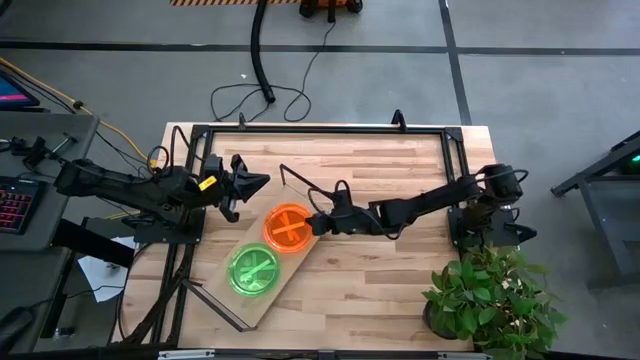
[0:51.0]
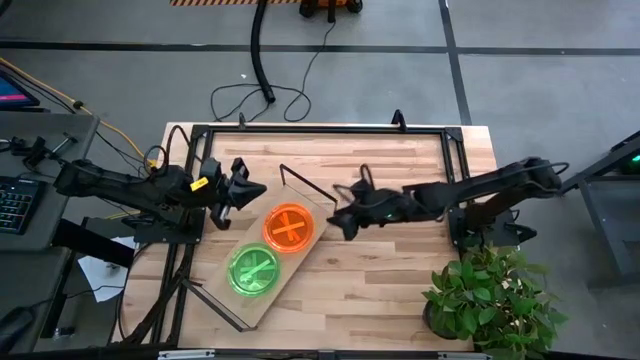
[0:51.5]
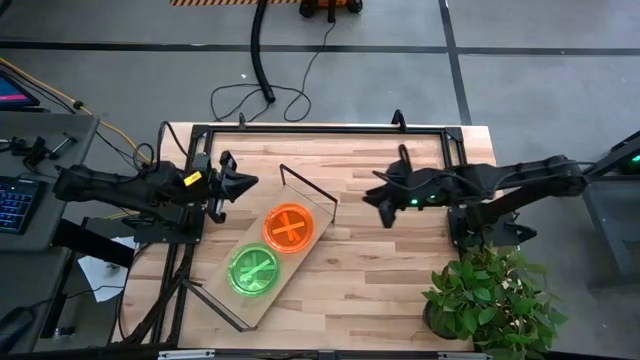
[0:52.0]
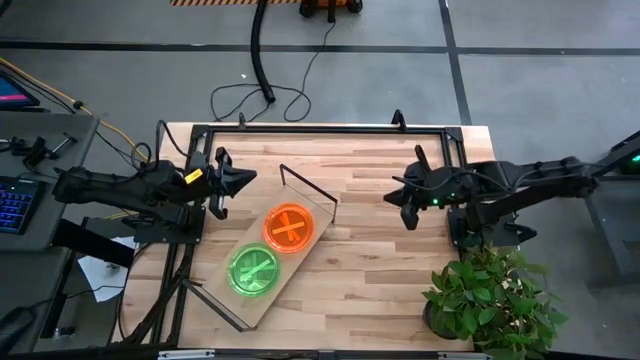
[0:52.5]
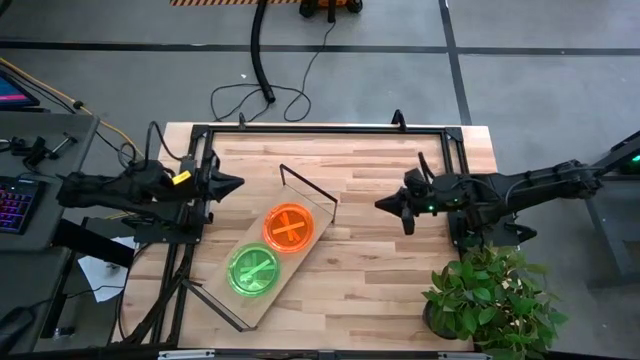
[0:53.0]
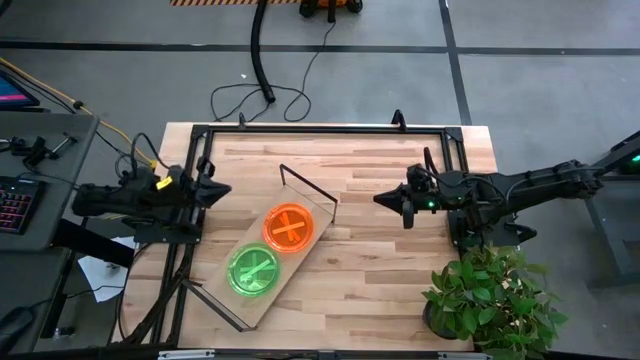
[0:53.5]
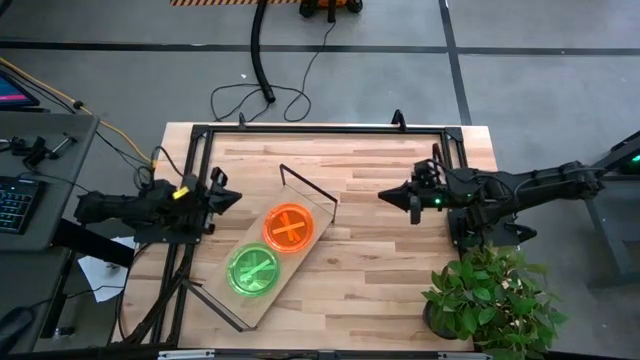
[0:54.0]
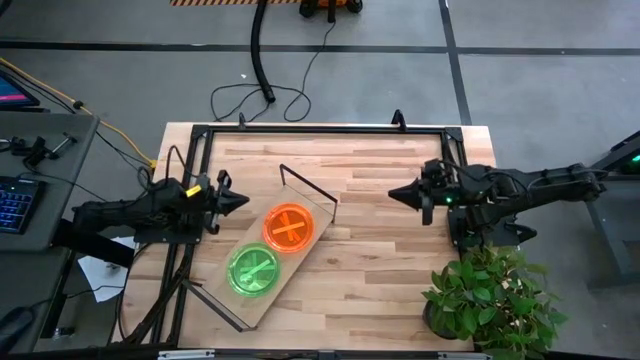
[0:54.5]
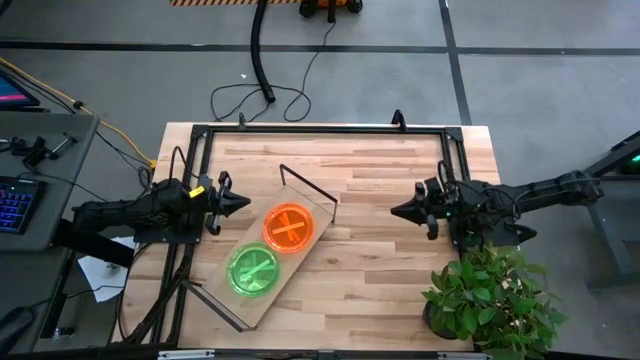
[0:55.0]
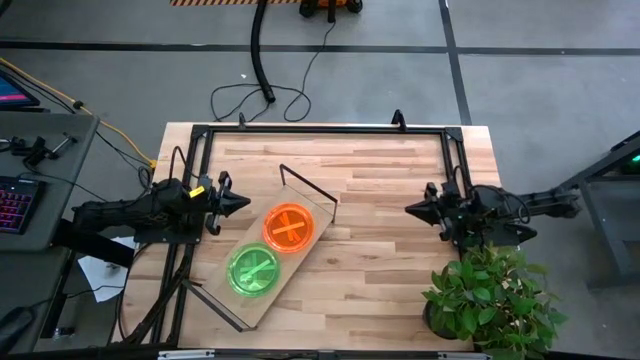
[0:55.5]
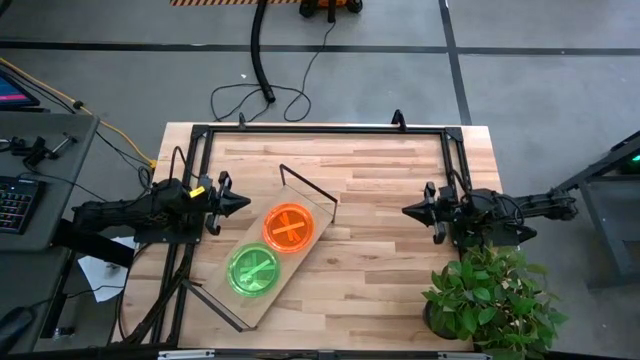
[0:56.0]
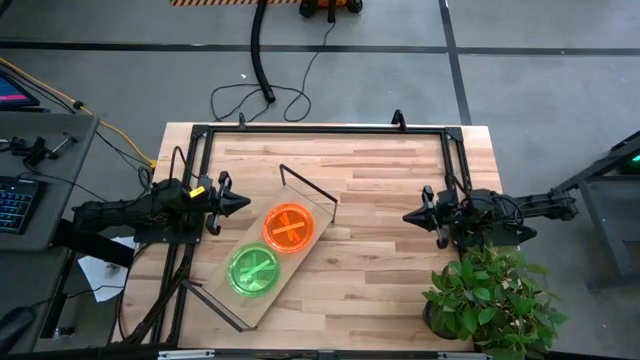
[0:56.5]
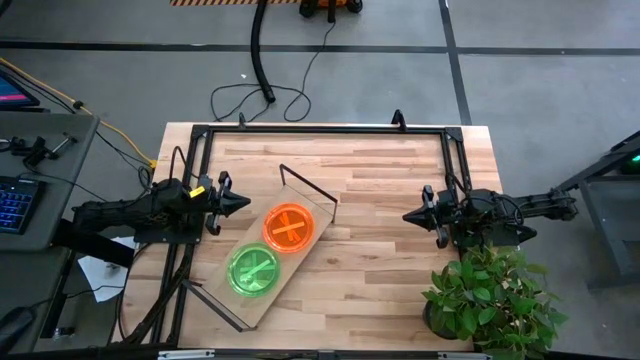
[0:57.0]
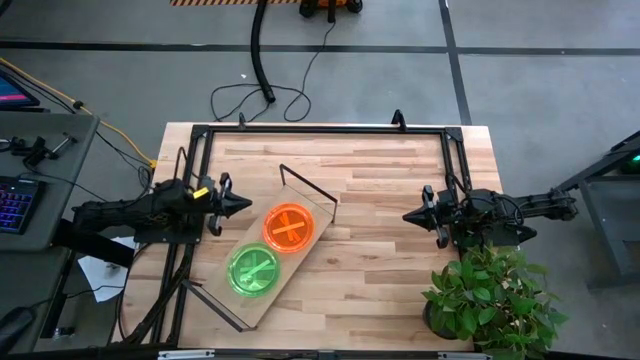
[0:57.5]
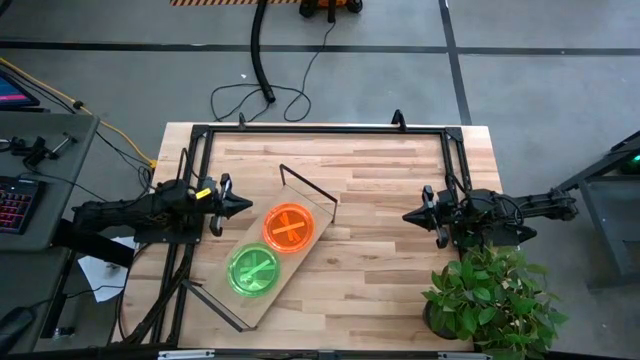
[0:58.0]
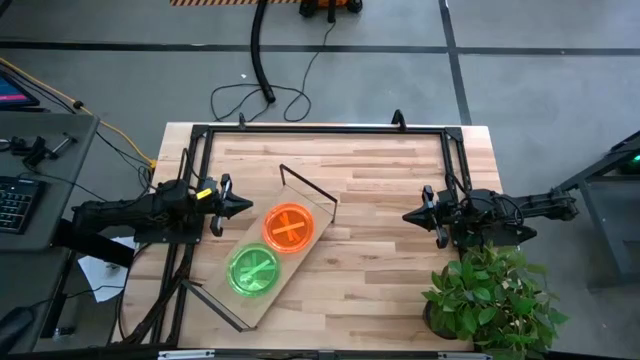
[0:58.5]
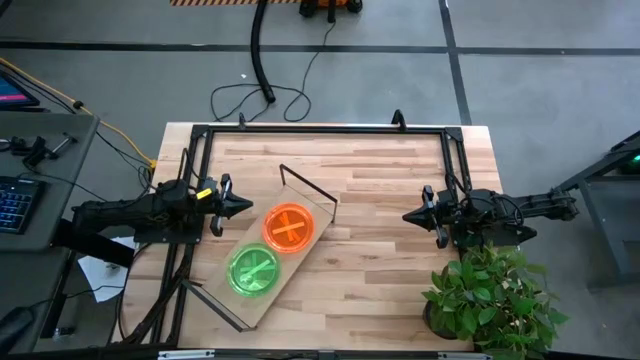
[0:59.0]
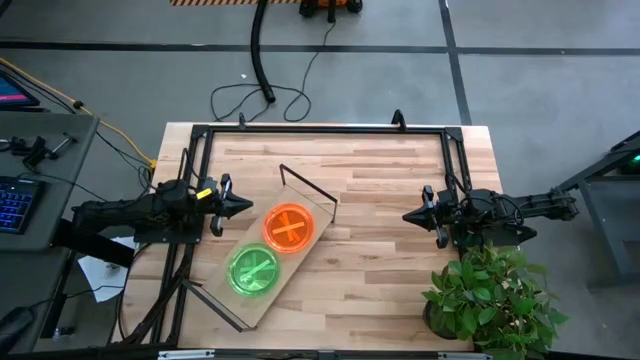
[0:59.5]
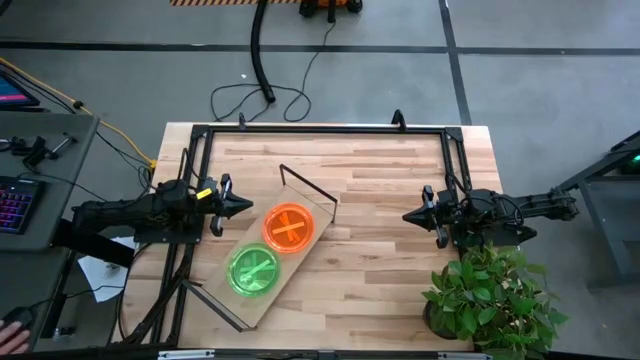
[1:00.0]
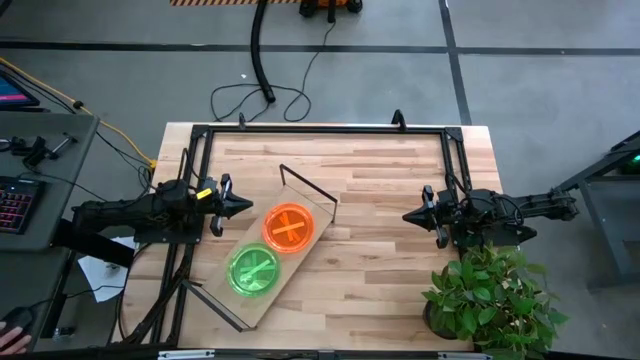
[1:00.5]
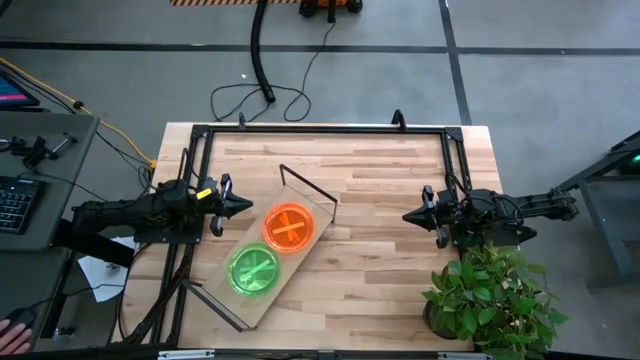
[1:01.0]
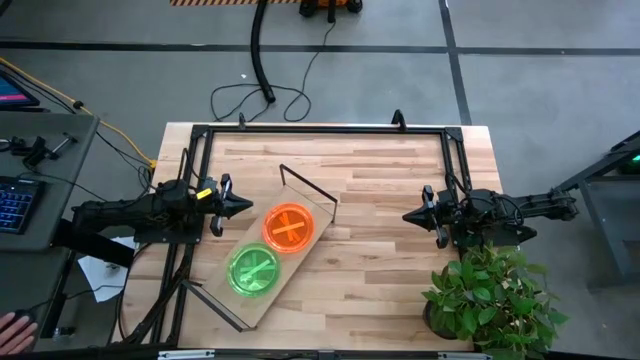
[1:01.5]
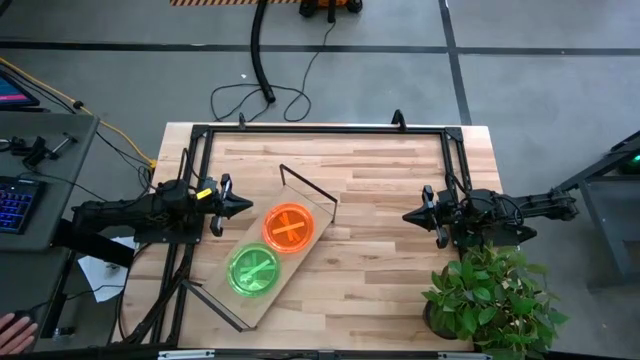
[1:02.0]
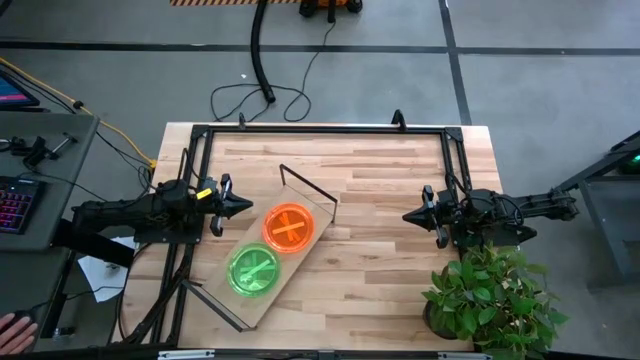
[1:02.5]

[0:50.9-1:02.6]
Task: Place and stack plates onto a shelf
Return to Home Position

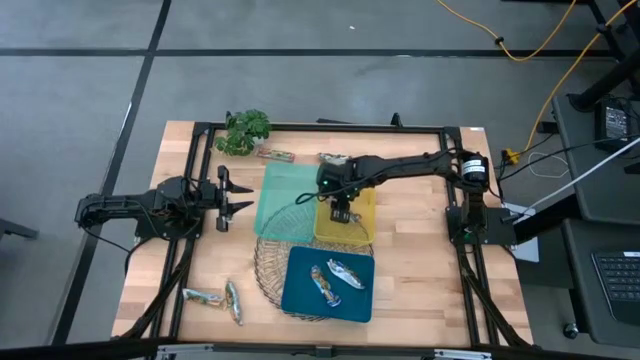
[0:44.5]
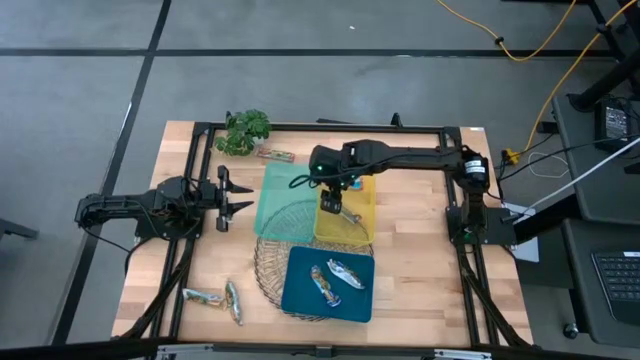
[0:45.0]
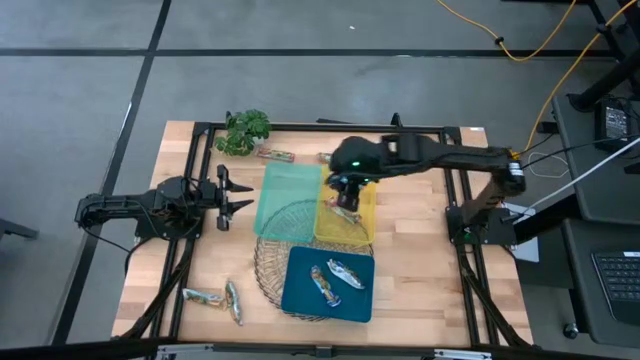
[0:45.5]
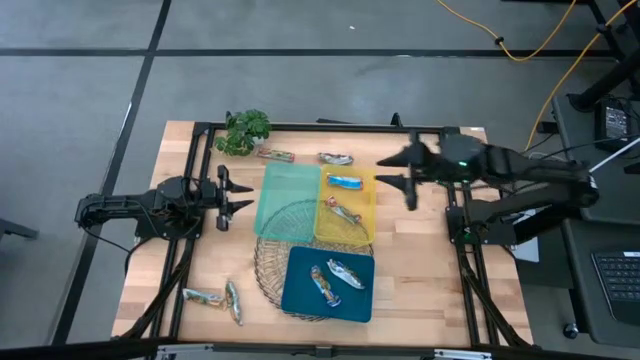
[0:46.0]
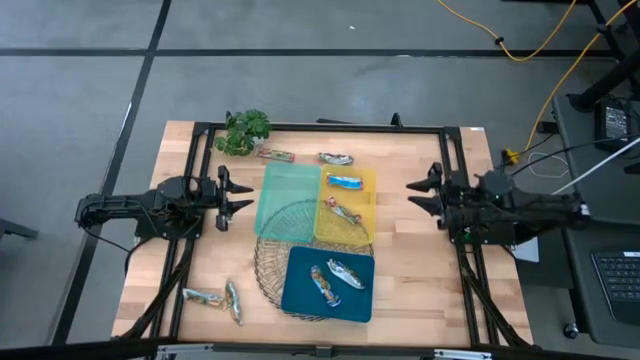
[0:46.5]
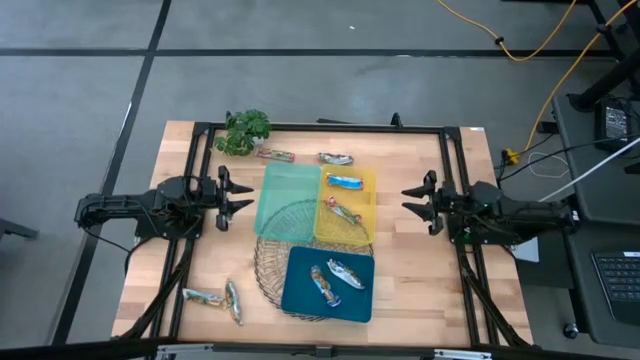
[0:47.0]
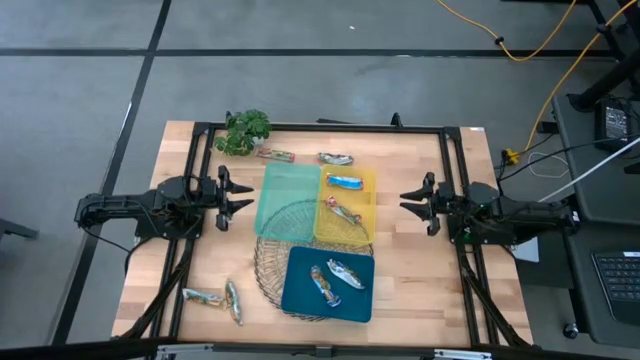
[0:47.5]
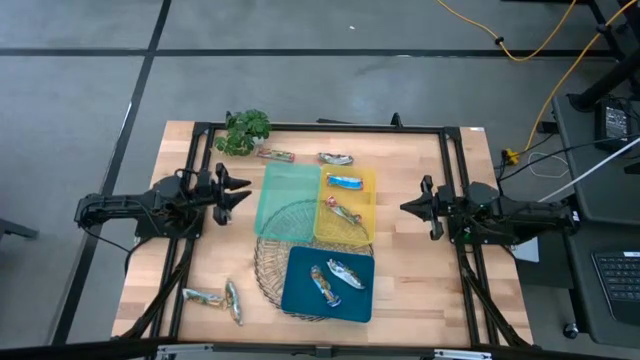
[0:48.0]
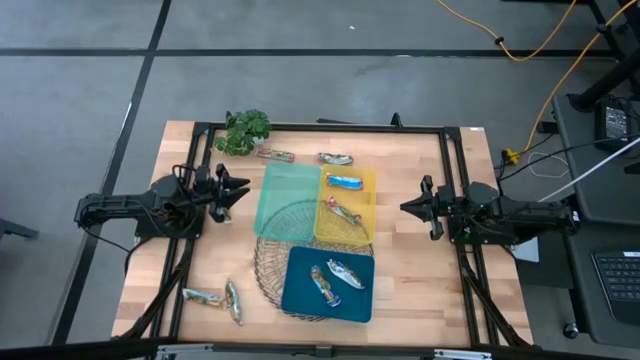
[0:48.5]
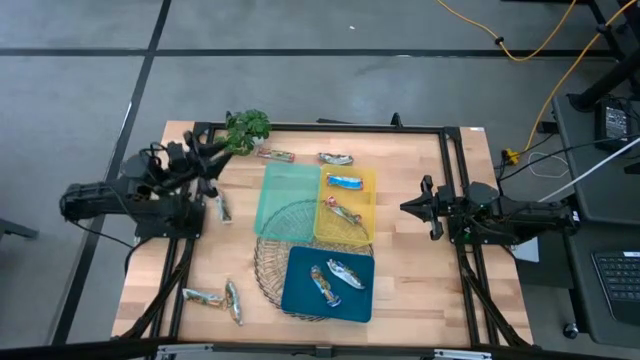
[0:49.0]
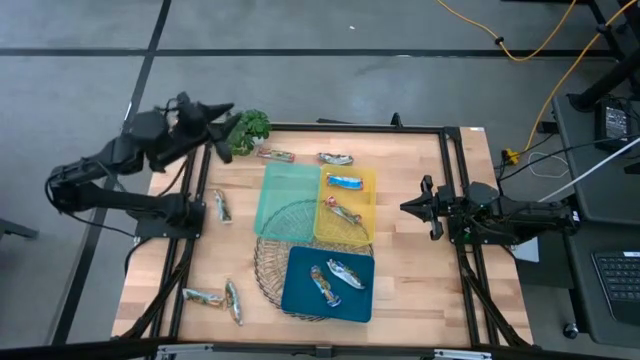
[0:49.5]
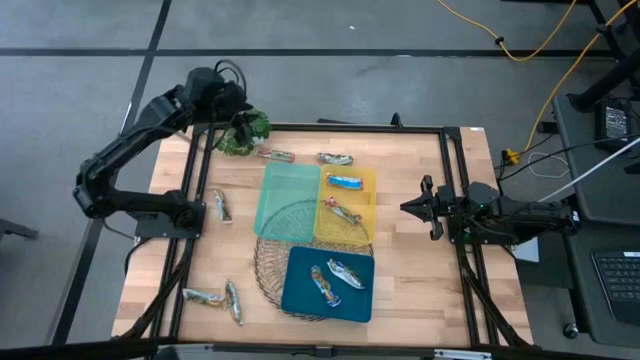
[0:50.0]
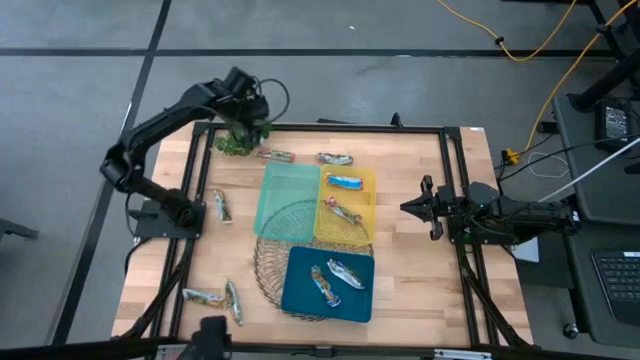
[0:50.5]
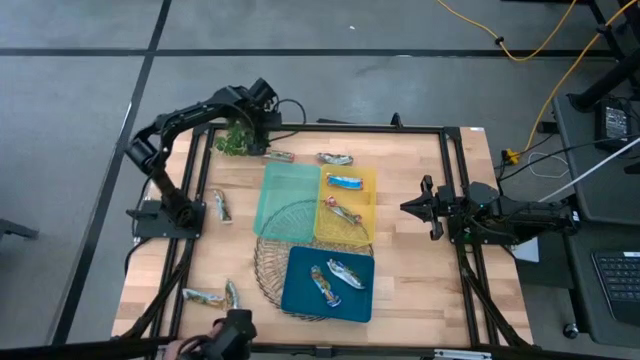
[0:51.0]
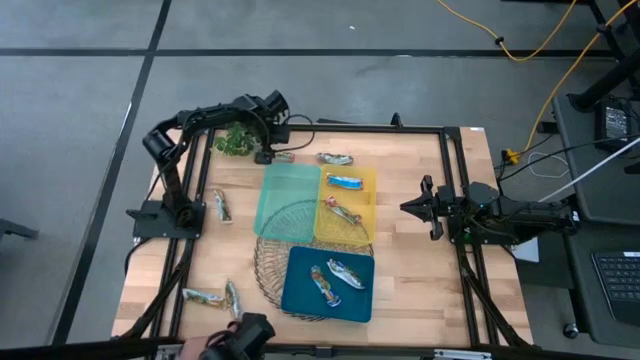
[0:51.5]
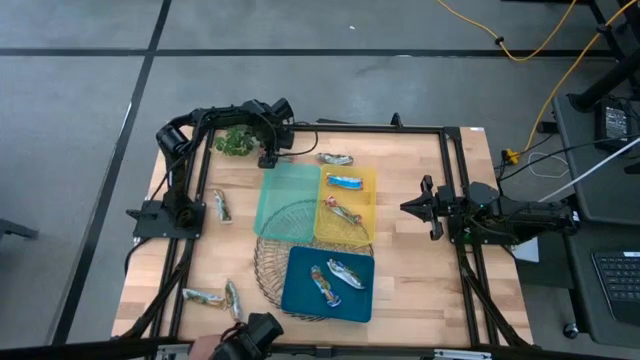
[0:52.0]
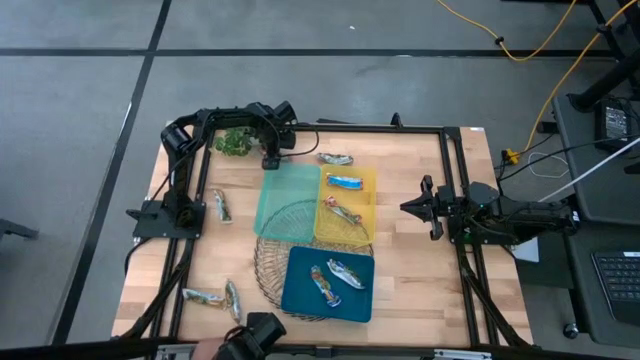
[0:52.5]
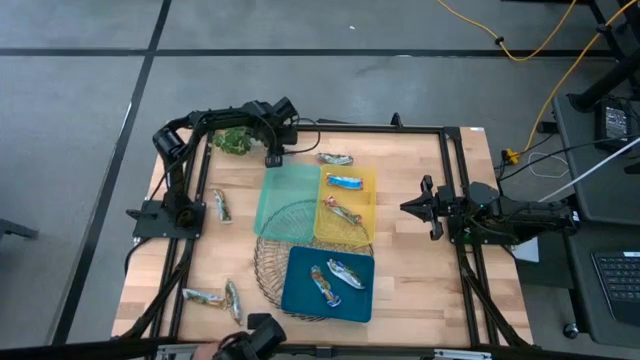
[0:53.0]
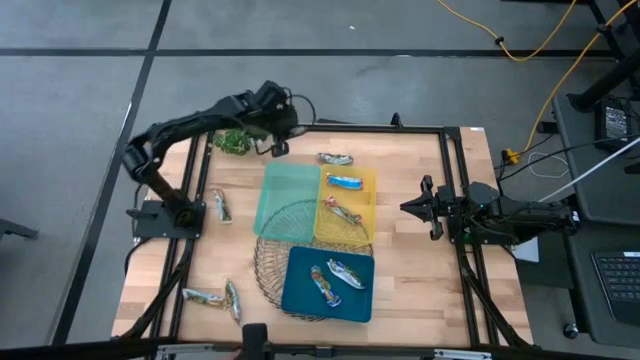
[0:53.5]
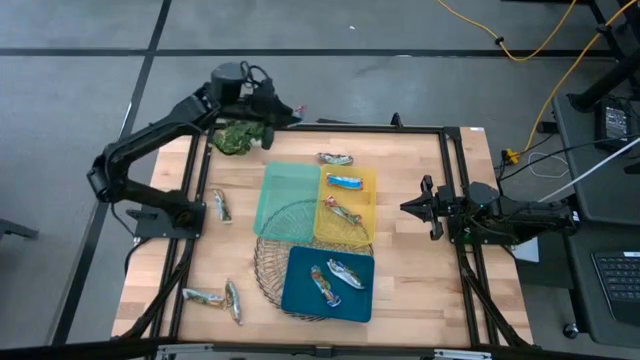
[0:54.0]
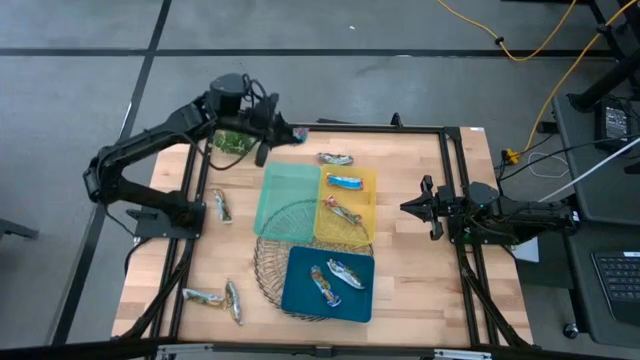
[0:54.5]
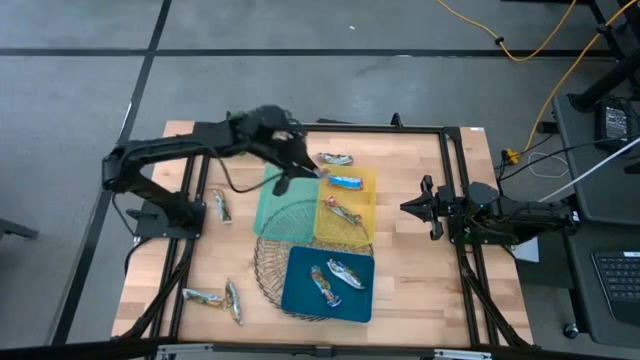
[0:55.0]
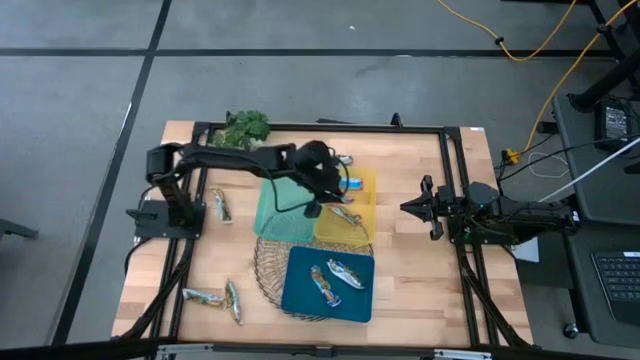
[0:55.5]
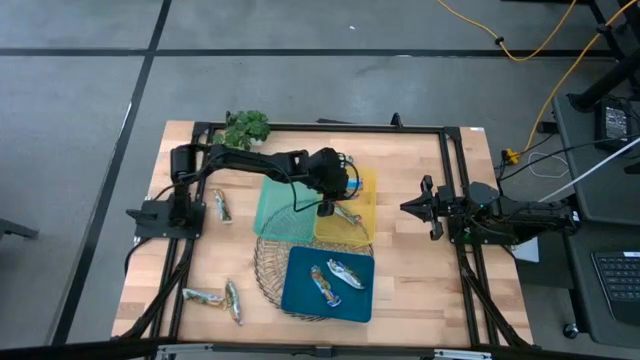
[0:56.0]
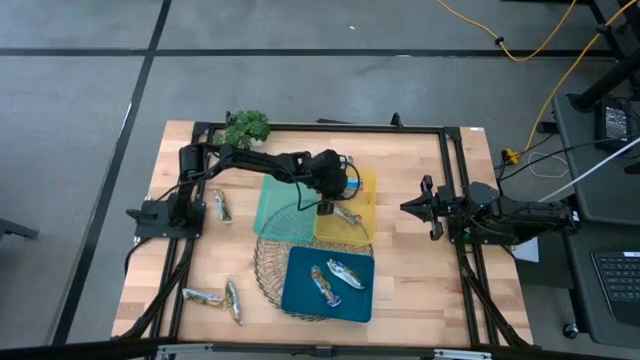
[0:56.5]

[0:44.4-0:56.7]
Task: Pick and place Granola Bars by type
Put the red granola bar into the yellow bin
